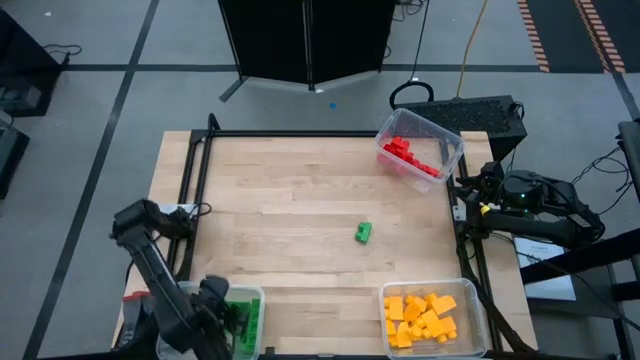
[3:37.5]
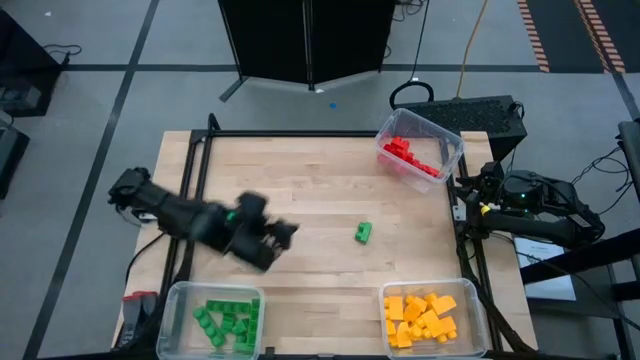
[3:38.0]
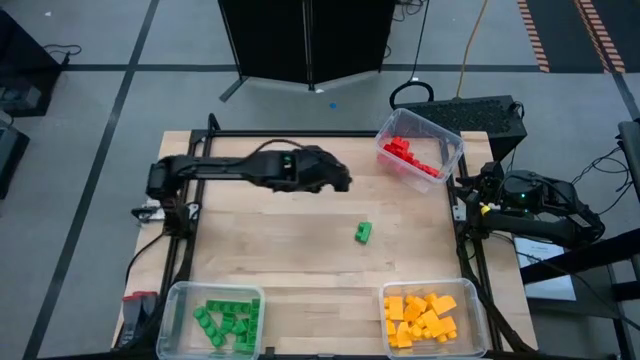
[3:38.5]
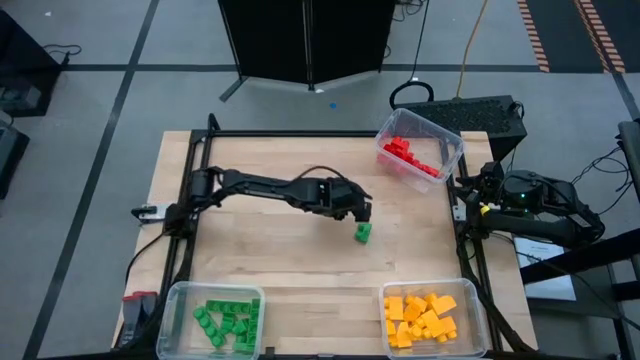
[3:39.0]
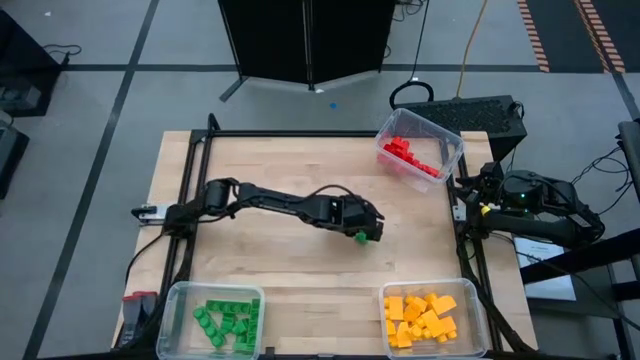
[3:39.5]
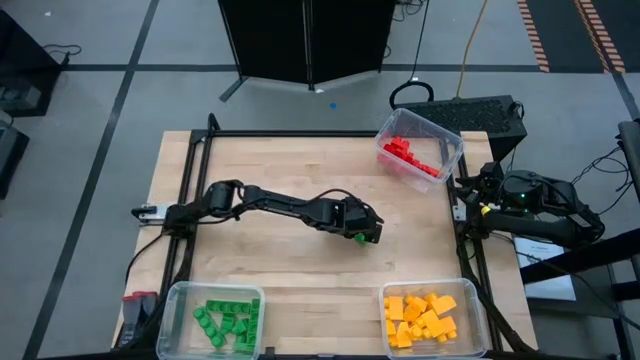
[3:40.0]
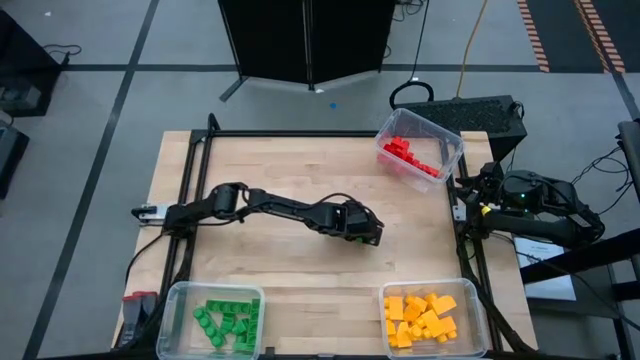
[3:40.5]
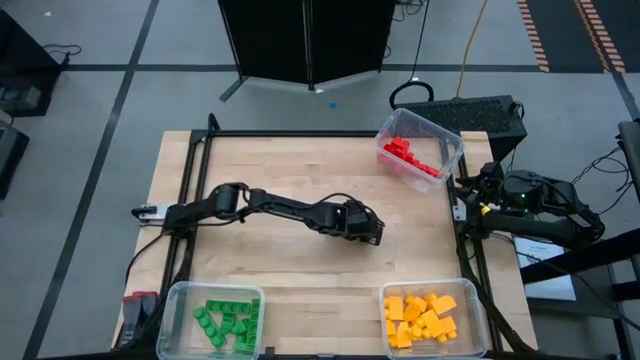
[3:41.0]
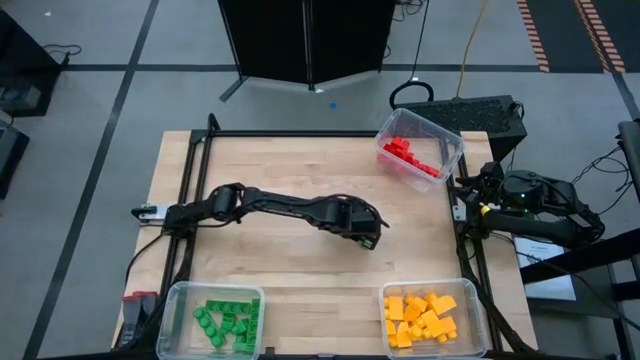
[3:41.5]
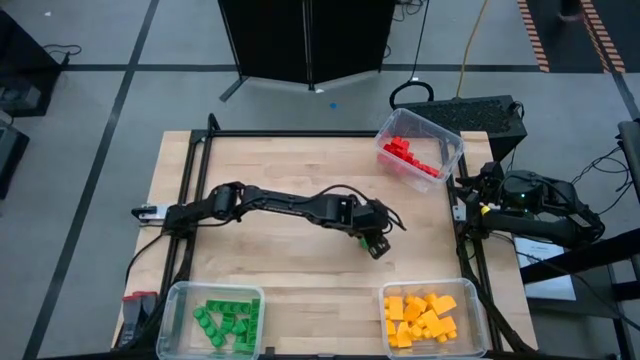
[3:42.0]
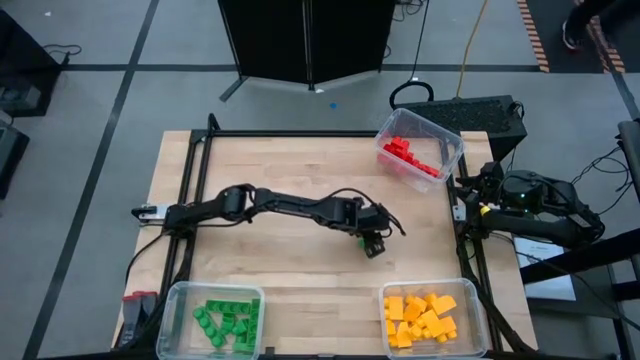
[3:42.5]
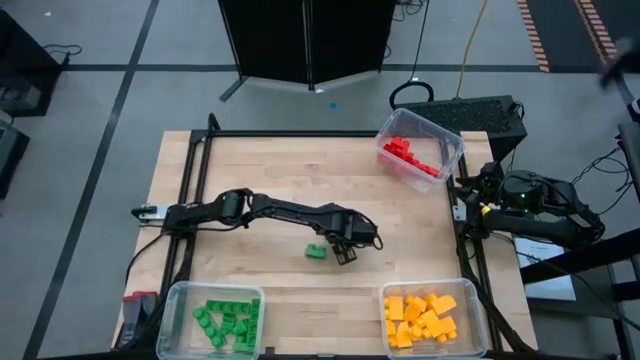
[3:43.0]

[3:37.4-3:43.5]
Task: Sort blocks
Put the green game piece into the bottom left transparent bin

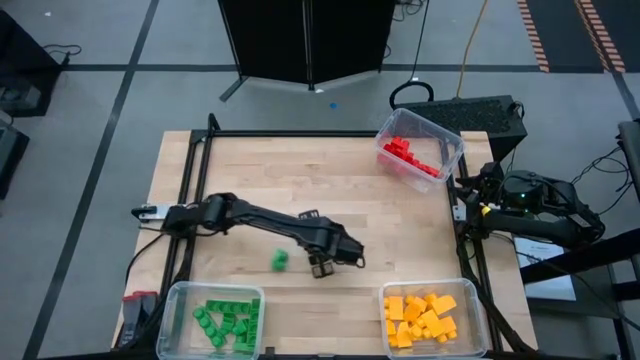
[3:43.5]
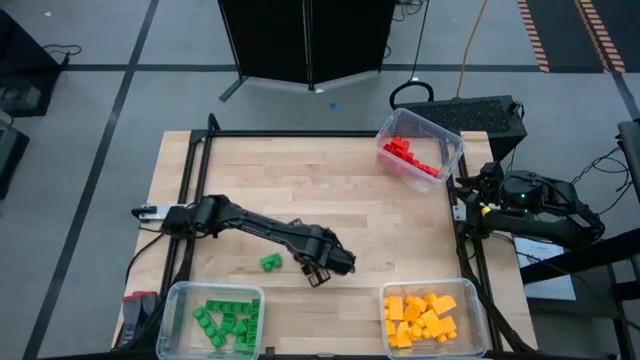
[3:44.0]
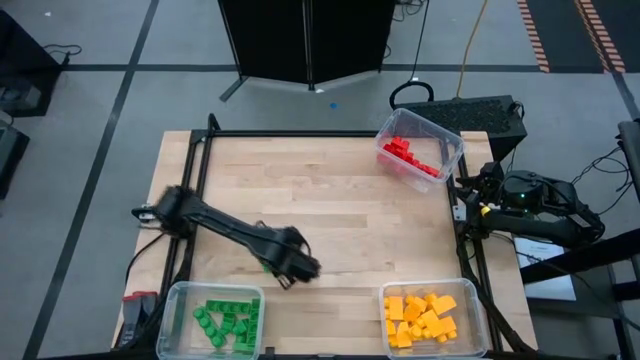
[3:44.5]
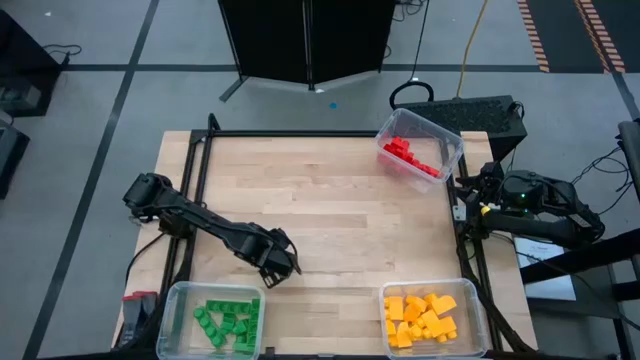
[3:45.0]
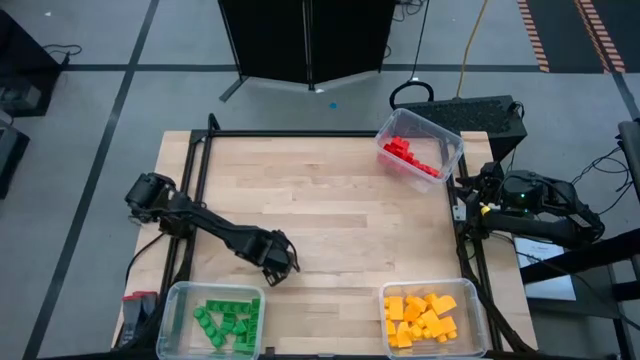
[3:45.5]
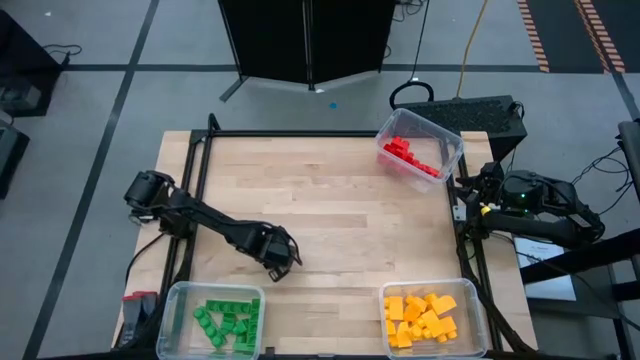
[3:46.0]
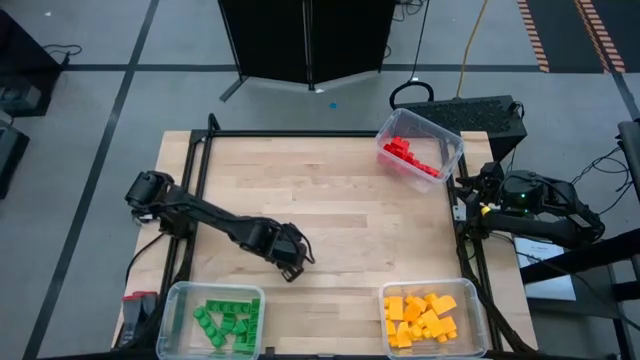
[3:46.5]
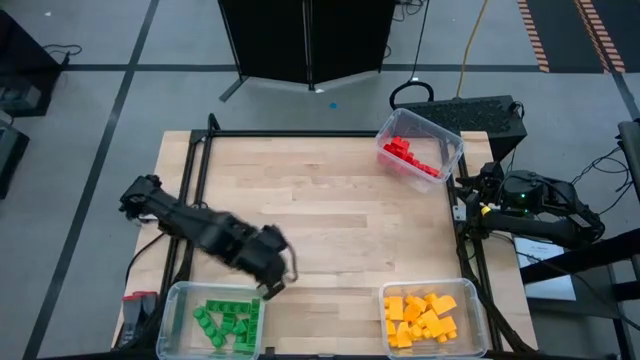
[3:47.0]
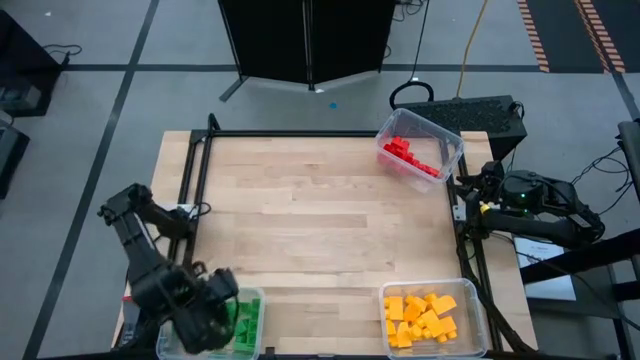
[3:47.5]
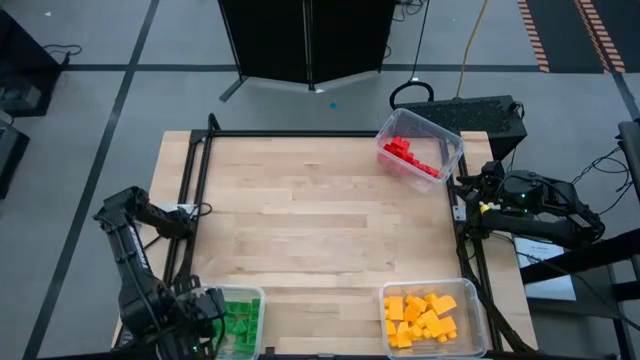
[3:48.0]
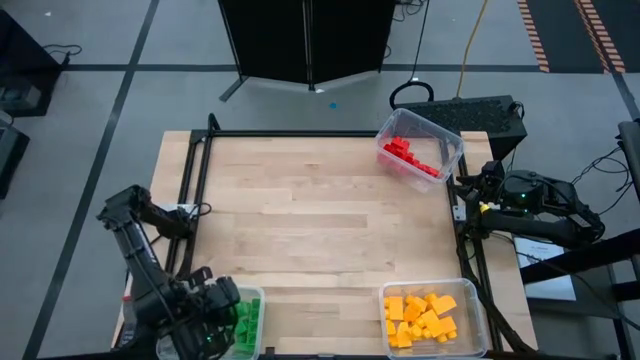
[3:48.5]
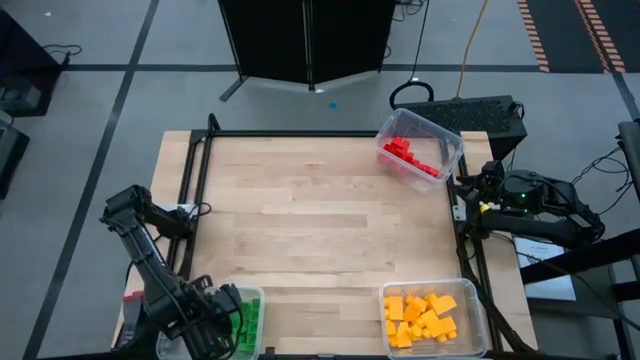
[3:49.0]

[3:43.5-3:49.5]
Put the green game piece into the bottom left transparent bin

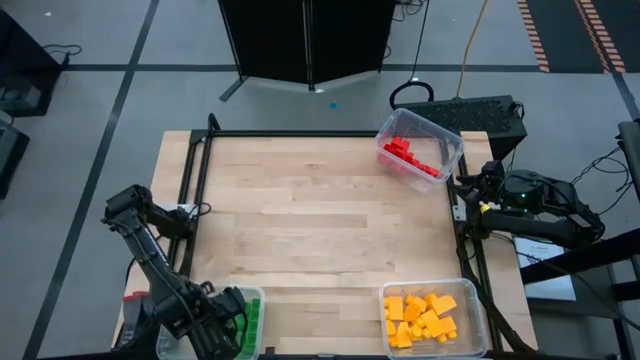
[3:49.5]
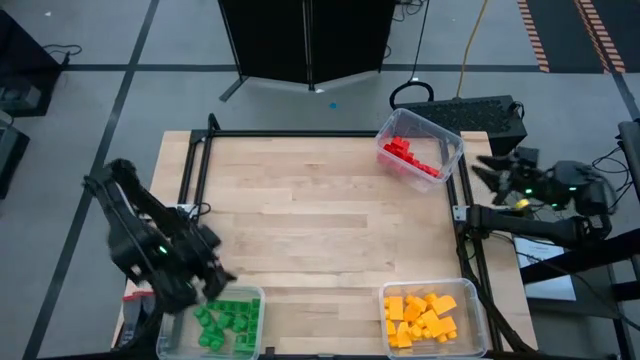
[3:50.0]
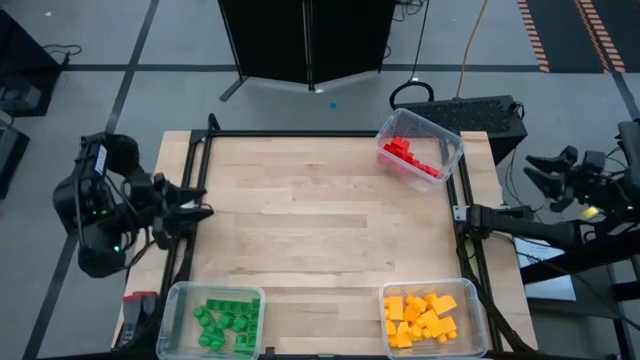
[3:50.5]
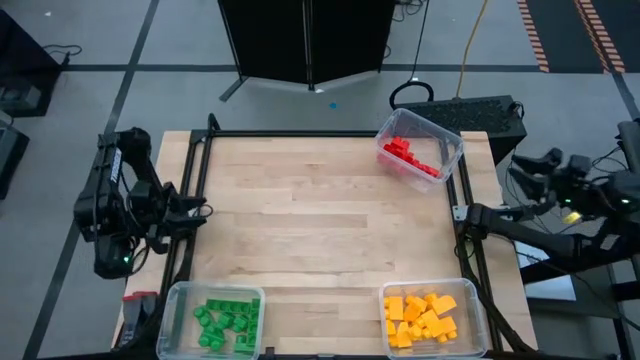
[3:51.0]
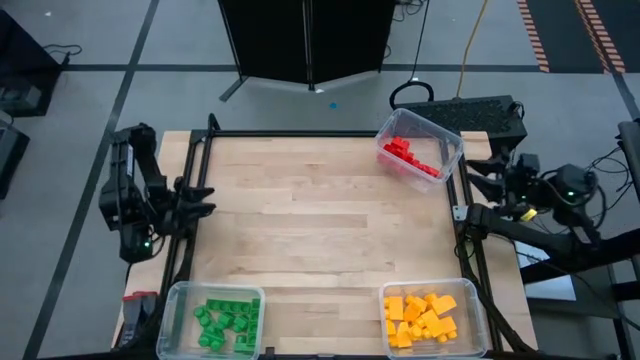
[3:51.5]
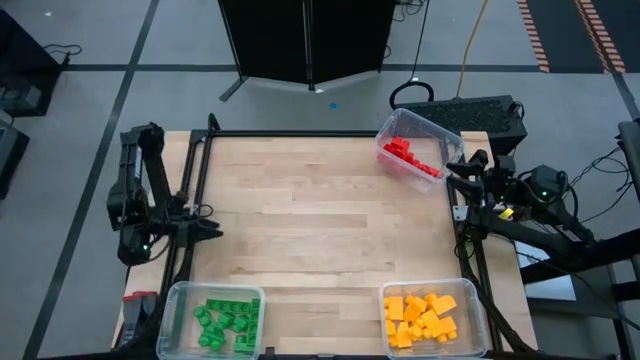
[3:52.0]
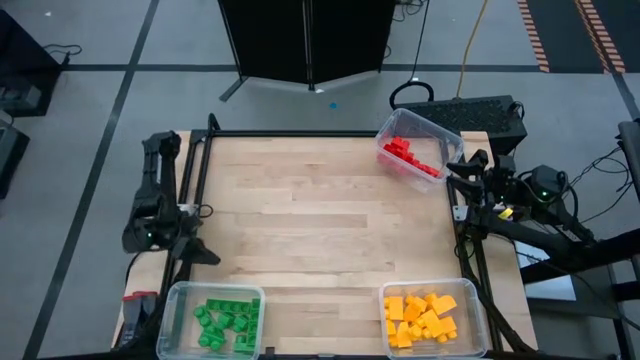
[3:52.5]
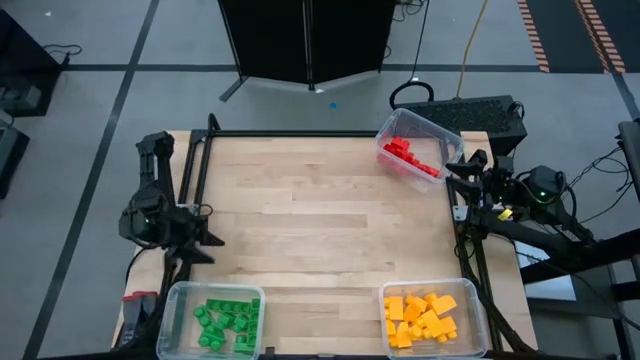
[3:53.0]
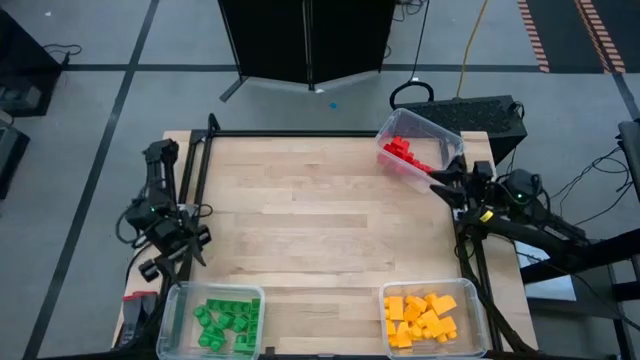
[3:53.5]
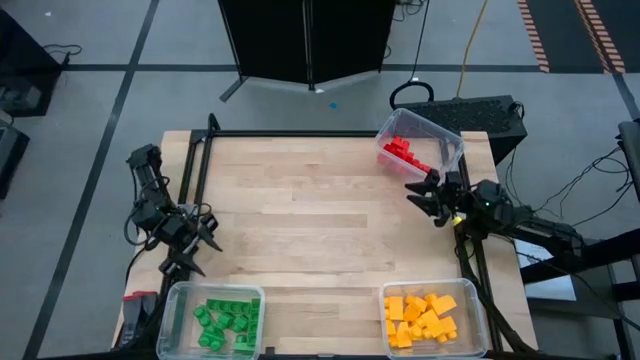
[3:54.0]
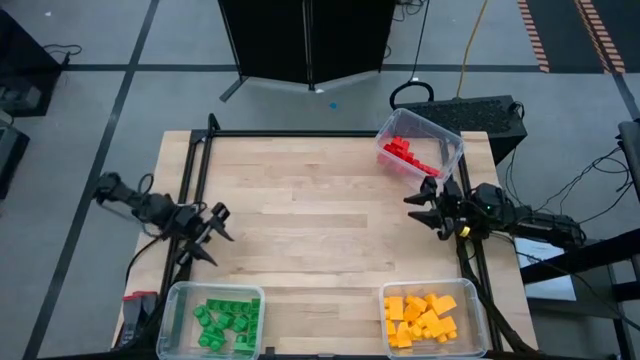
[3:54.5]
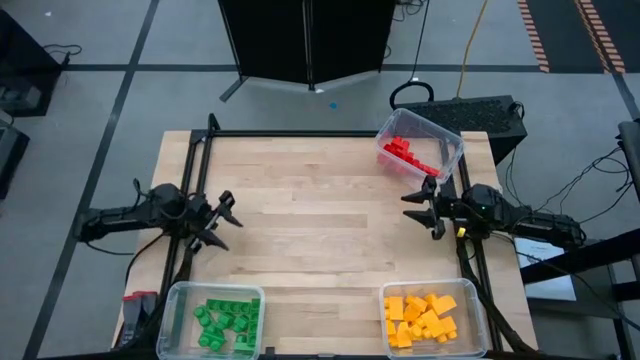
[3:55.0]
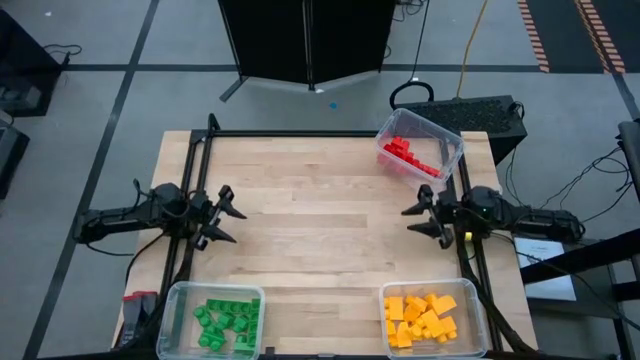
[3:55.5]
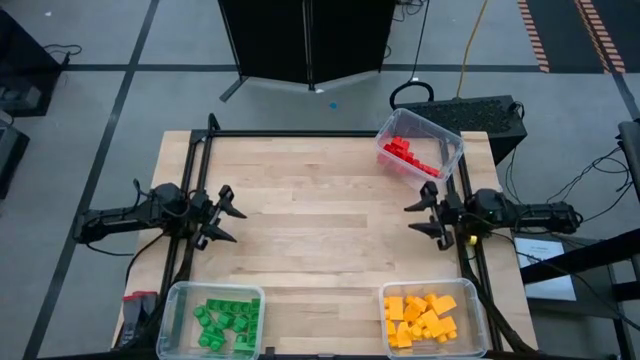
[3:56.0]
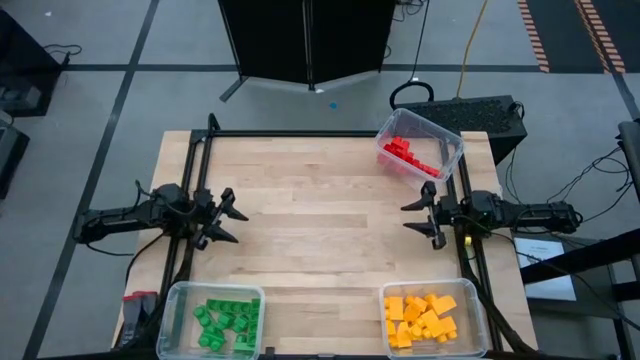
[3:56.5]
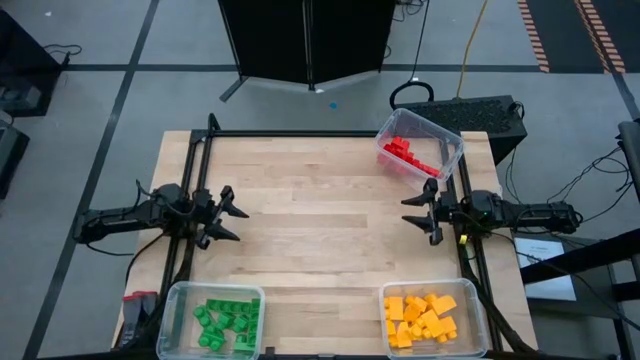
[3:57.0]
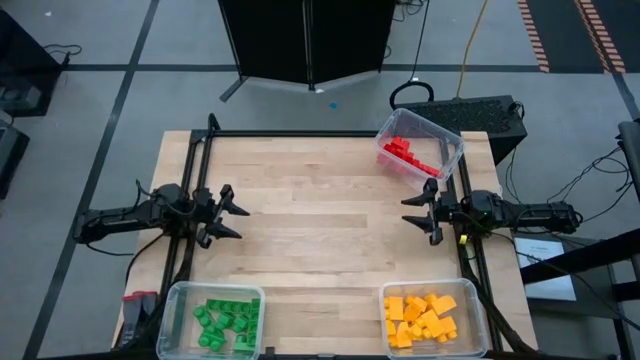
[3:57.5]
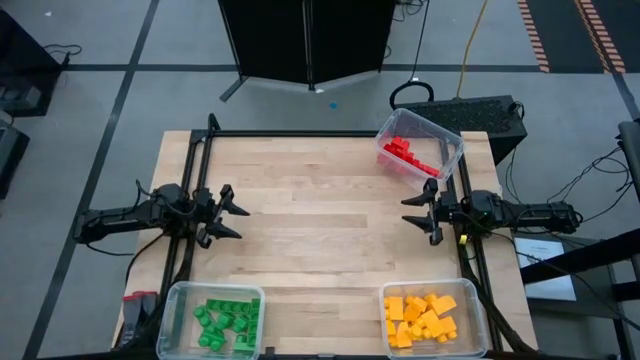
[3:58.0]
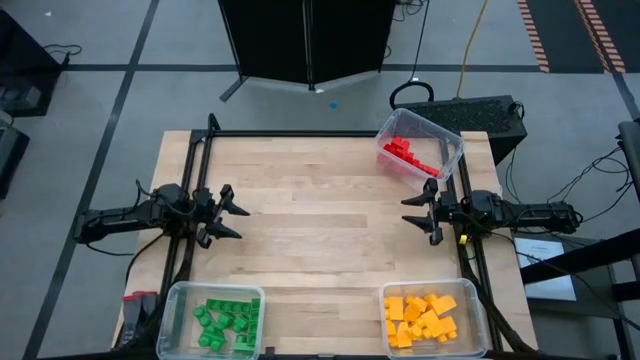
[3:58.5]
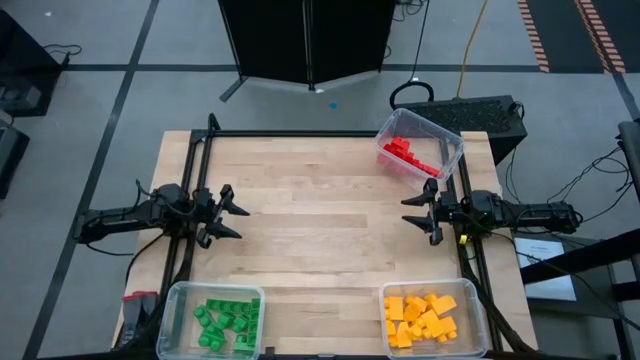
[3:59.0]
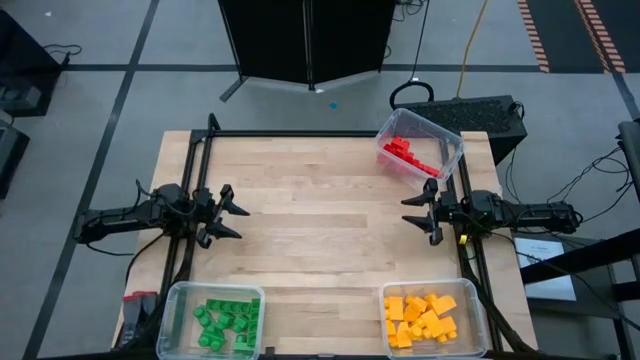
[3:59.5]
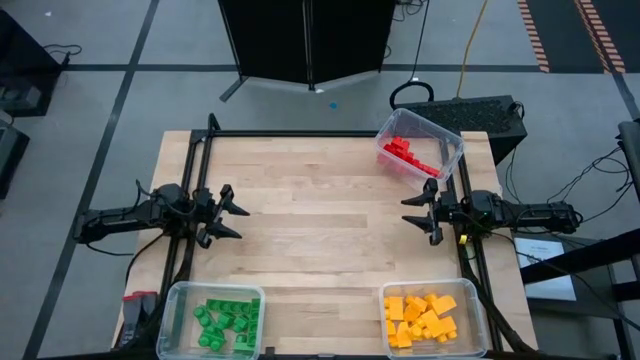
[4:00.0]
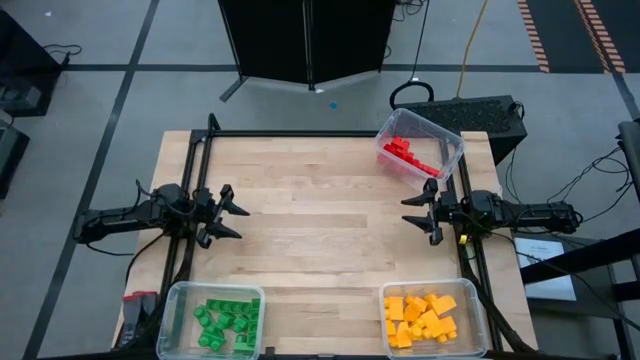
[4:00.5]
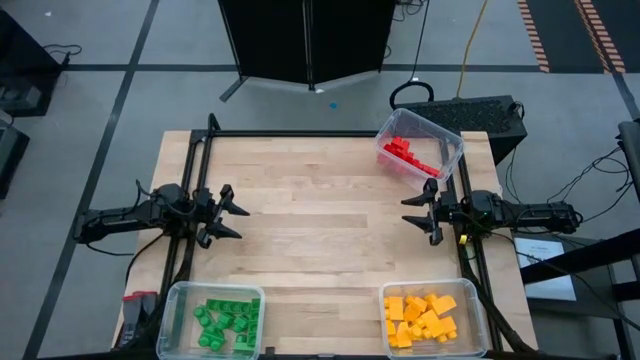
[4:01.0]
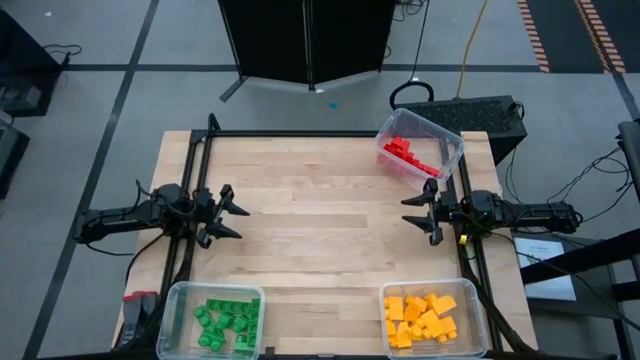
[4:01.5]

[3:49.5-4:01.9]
Return to Home Position
